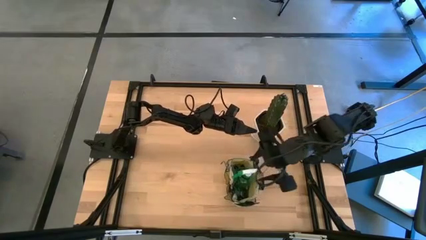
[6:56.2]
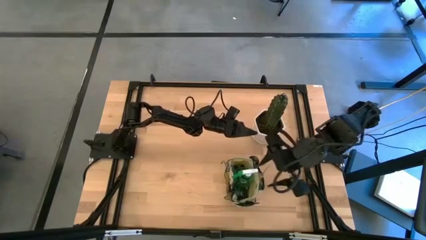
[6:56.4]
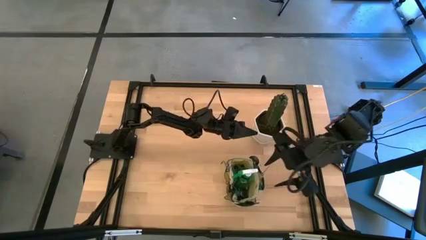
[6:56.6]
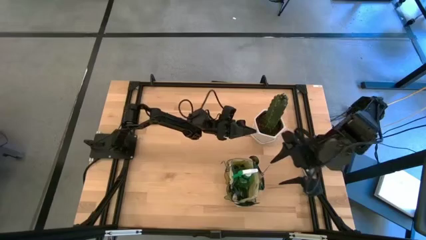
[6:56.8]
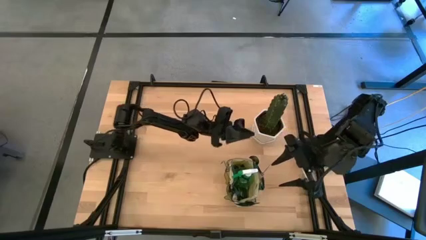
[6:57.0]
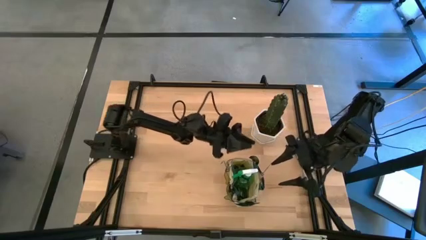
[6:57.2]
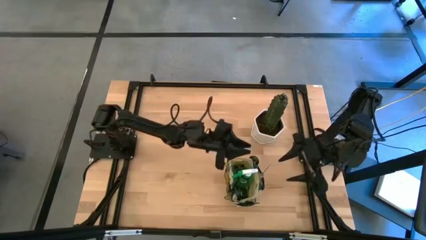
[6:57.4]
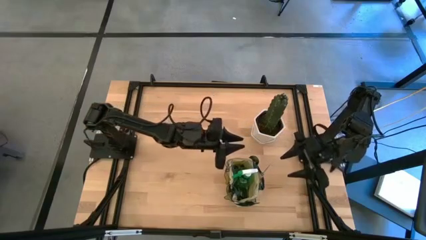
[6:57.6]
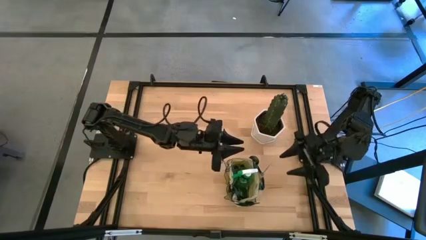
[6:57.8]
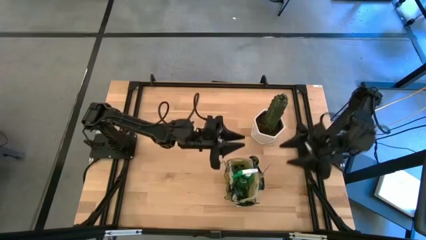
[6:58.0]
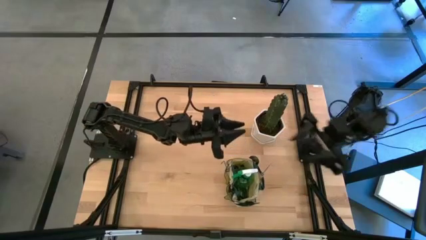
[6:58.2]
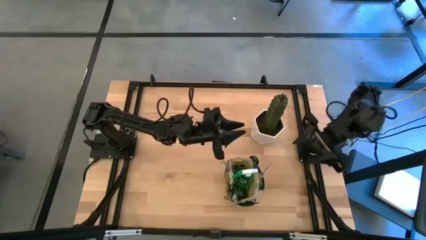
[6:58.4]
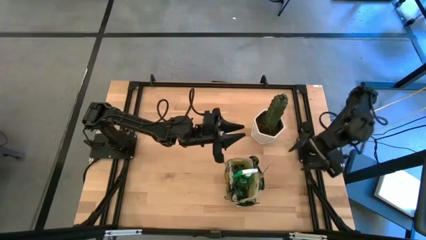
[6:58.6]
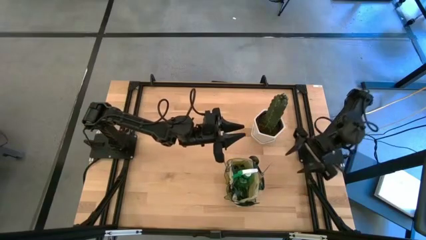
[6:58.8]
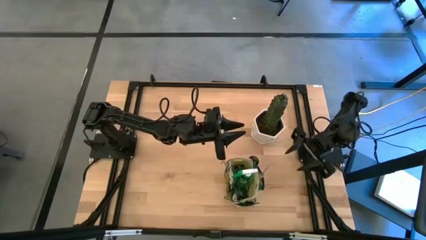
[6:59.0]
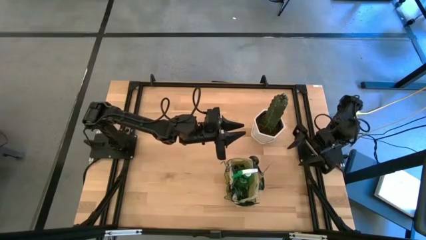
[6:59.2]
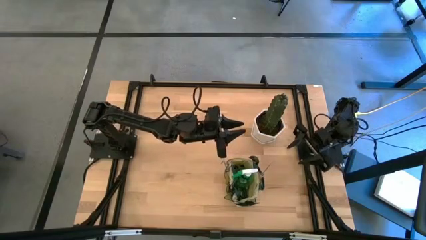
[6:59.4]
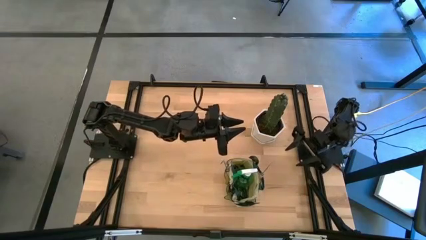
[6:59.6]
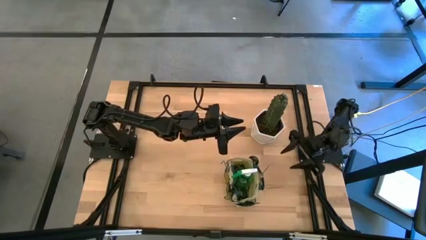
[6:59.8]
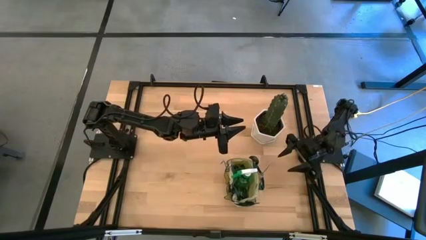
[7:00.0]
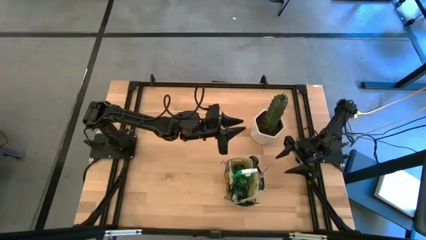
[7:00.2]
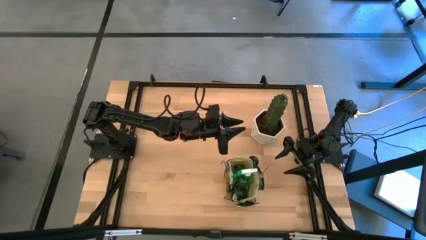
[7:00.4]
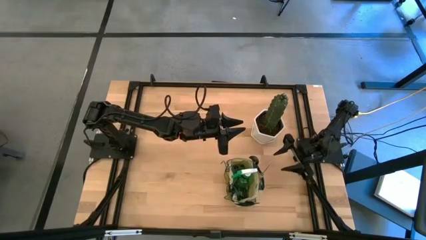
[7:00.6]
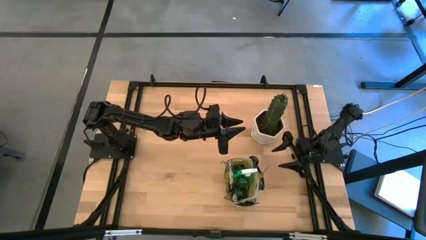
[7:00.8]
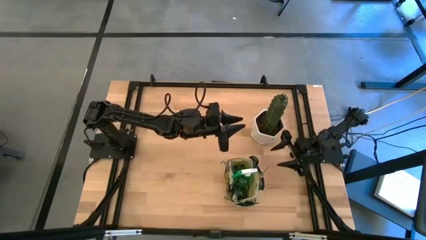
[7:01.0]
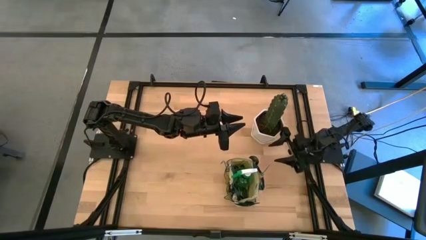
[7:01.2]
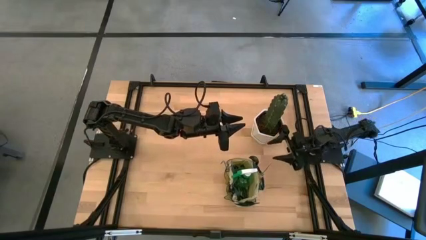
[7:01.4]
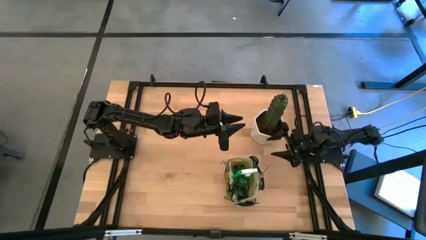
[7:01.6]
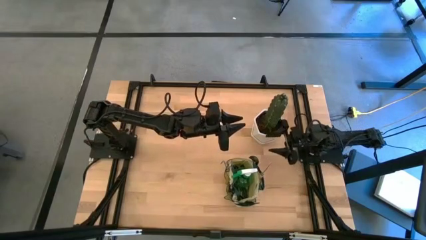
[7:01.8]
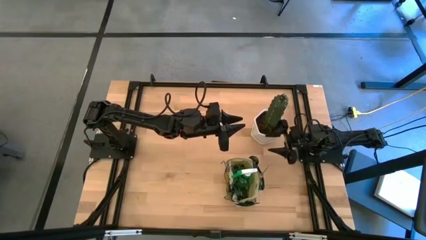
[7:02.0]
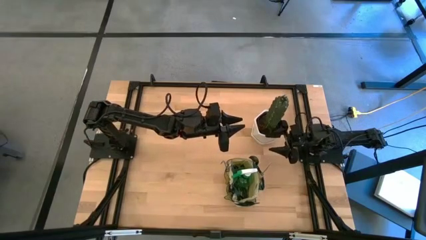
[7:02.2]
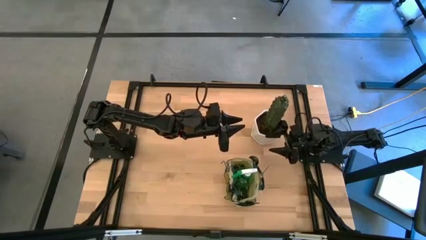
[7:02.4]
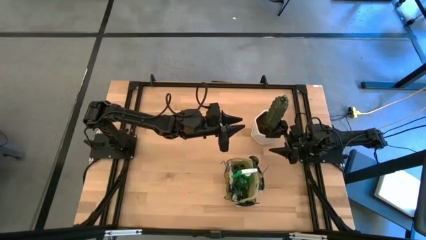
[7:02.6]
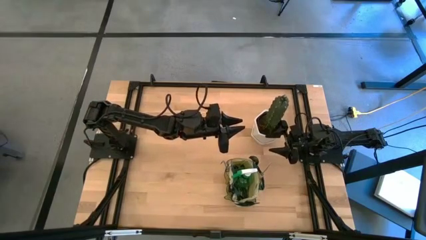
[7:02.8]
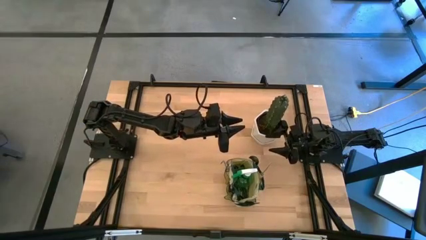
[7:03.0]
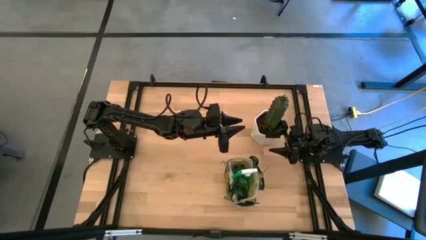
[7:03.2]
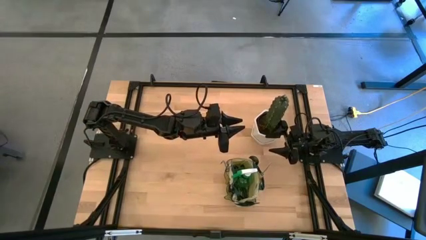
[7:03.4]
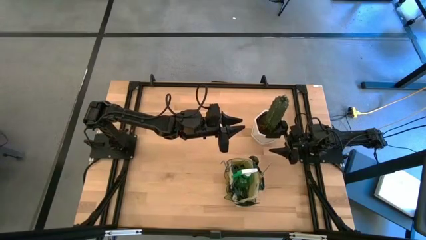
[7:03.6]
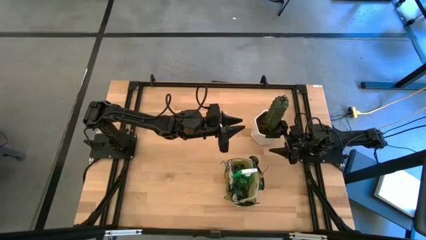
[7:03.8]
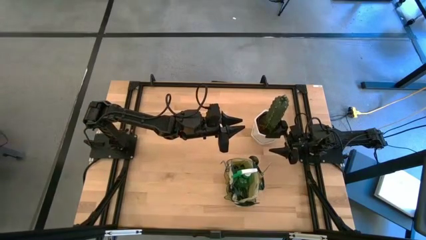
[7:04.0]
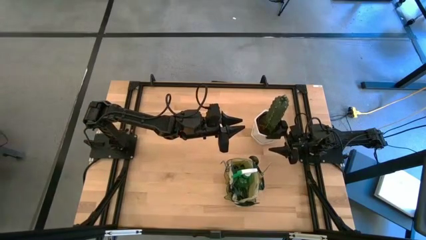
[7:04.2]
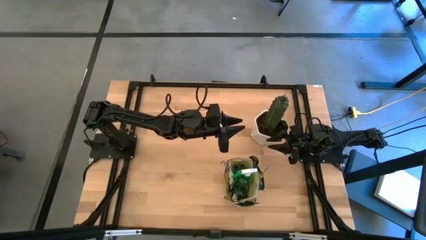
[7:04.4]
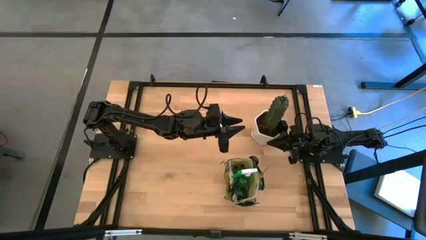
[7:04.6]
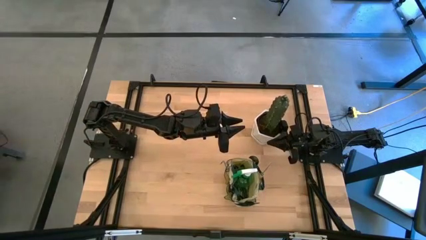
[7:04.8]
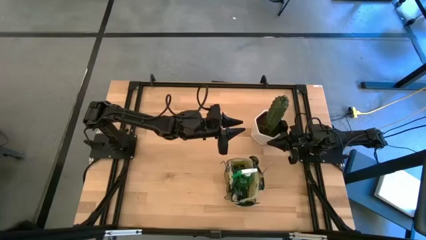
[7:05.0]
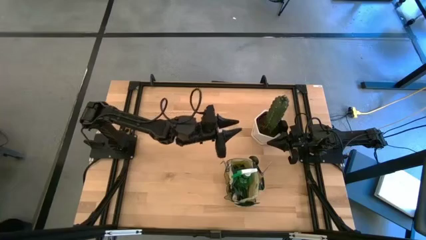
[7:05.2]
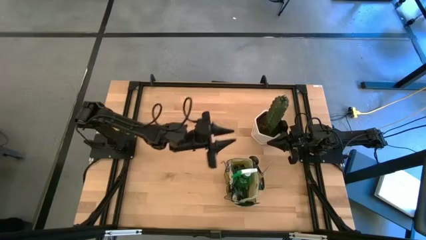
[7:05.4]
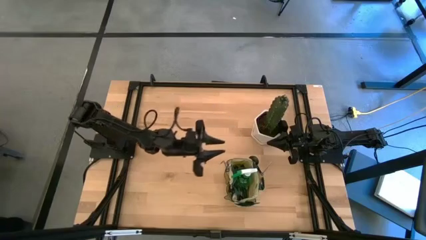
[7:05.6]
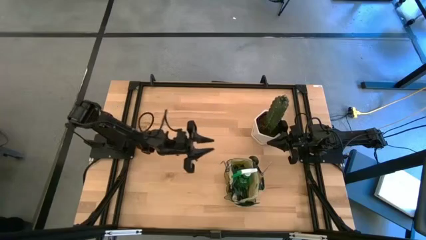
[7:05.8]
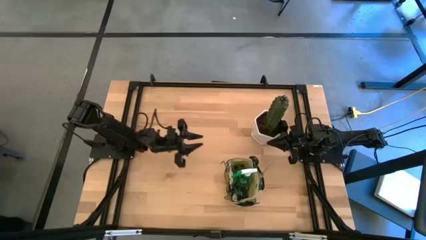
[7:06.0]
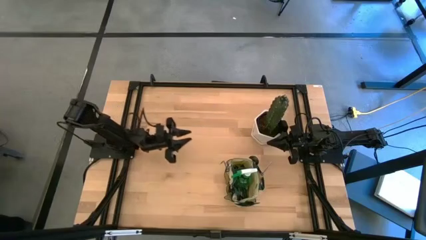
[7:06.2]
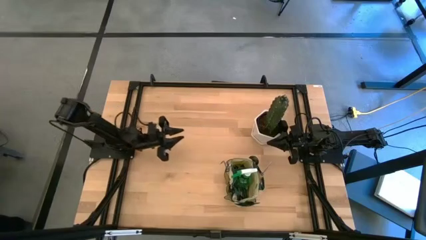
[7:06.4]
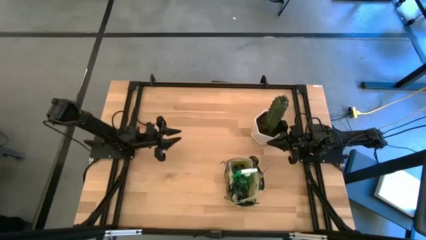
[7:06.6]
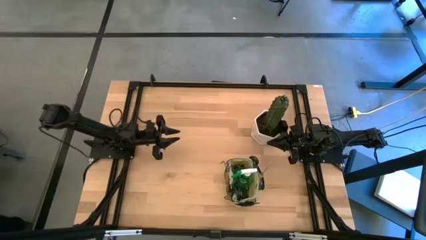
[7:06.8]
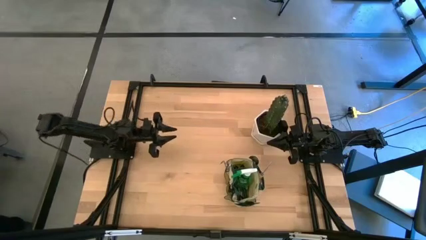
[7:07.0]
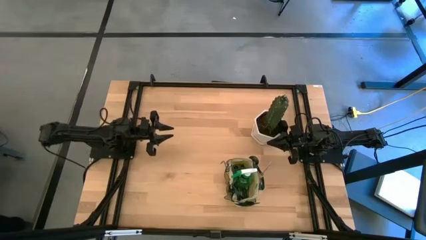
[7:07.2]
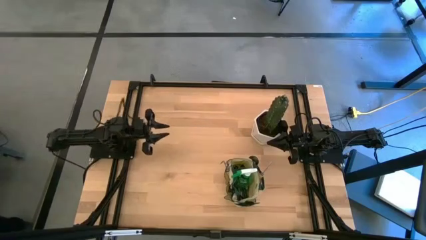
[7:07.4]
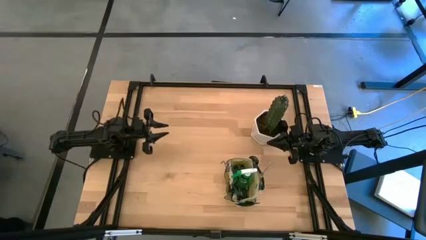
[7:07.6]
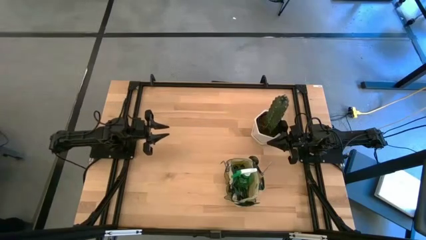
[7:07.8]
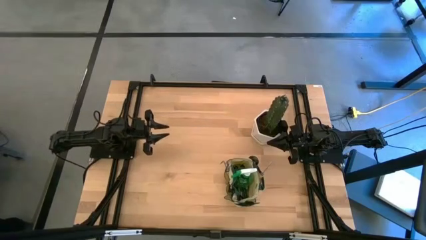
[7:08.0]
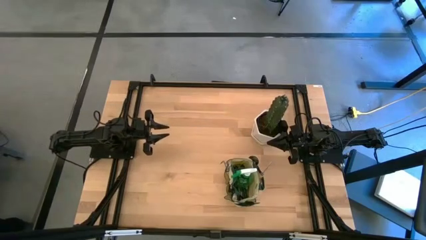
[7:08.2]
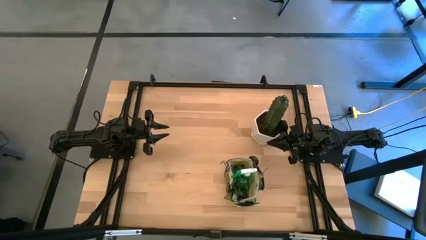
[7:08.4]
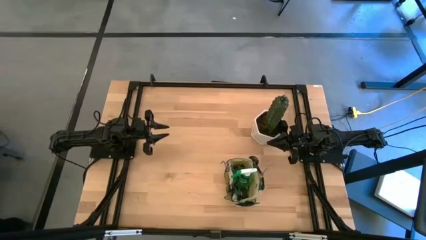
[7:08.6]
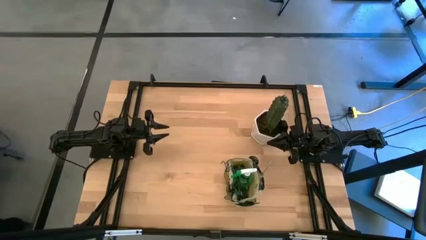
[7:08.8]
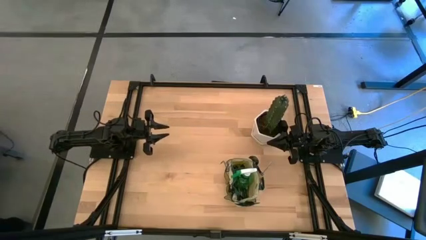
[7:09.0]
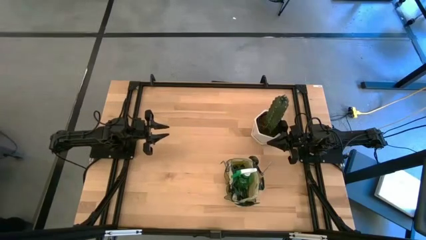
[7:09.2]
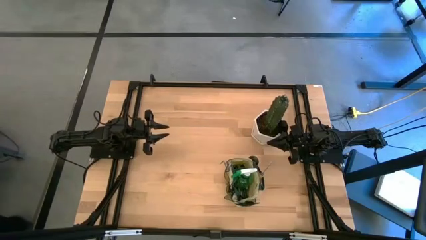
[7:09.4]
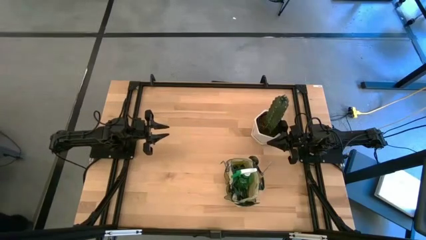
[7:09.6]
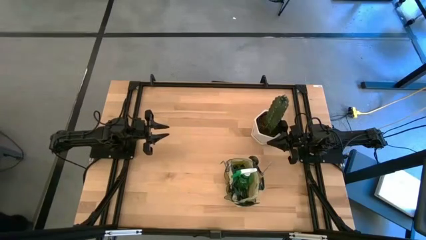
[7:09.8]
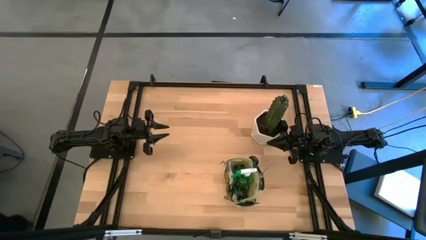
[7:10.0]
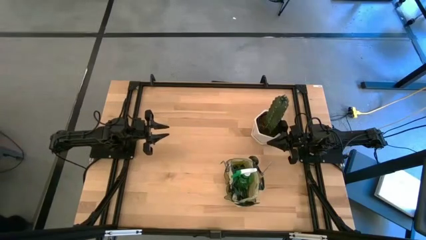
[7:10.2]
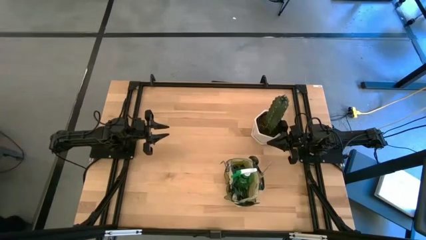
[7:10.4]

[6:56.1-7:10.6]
Task: Pick & Place Garden tools in Gardening bag
Return to Home Position

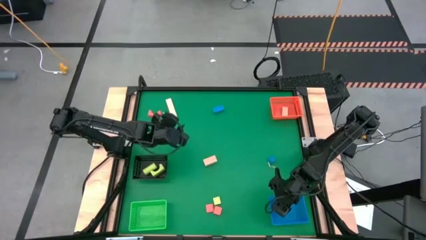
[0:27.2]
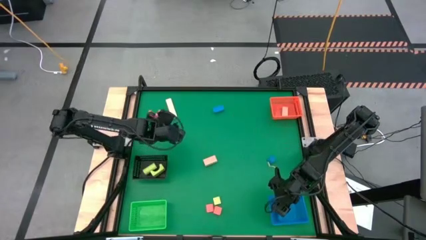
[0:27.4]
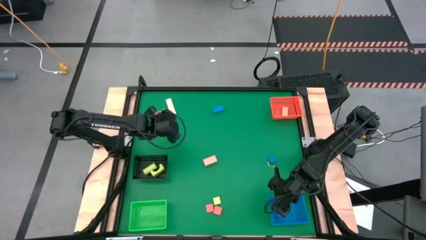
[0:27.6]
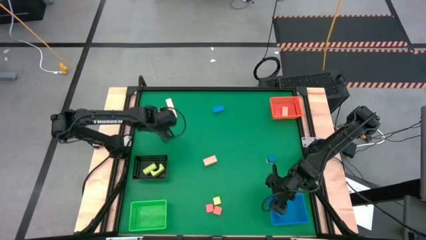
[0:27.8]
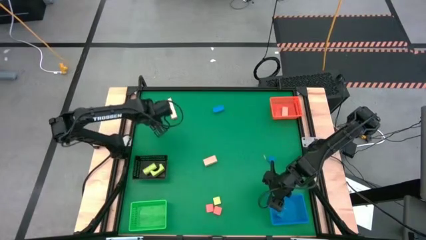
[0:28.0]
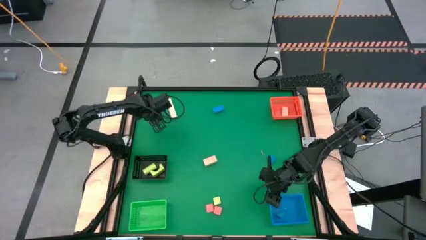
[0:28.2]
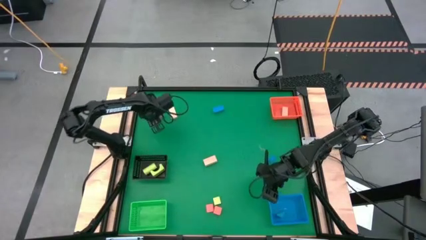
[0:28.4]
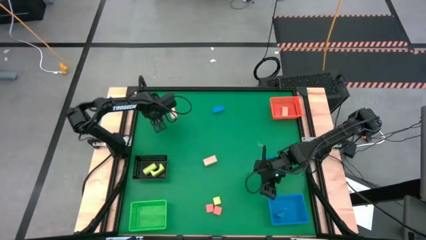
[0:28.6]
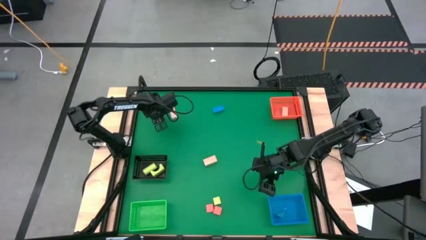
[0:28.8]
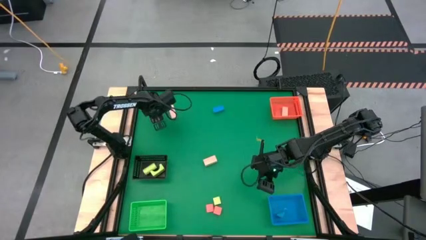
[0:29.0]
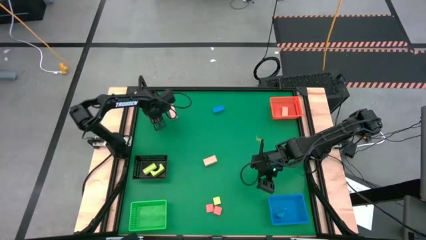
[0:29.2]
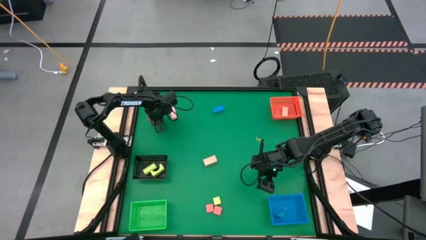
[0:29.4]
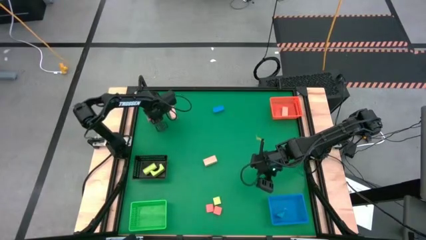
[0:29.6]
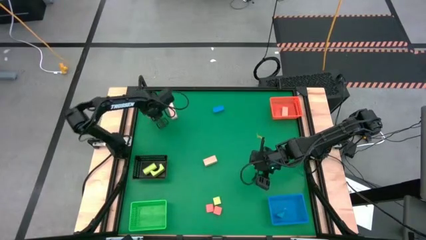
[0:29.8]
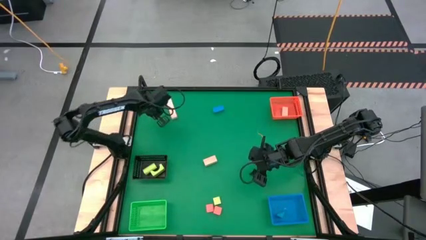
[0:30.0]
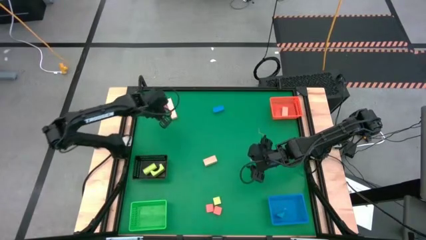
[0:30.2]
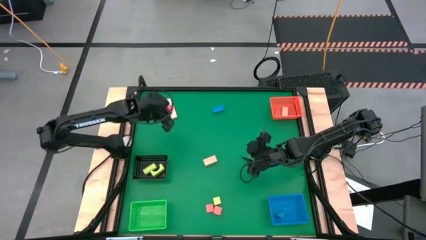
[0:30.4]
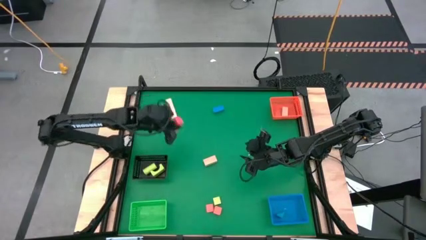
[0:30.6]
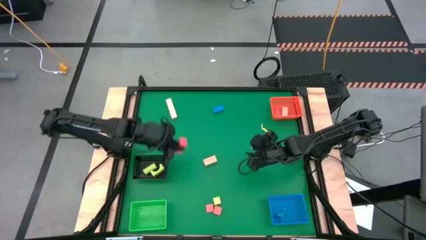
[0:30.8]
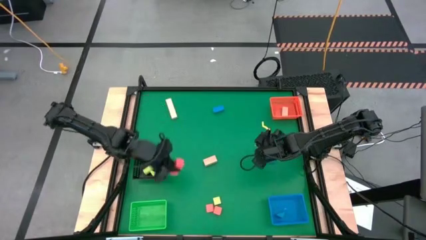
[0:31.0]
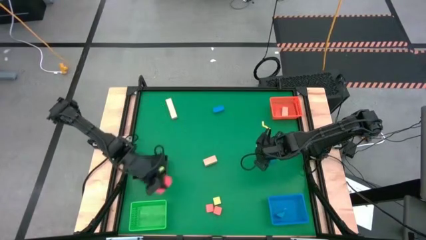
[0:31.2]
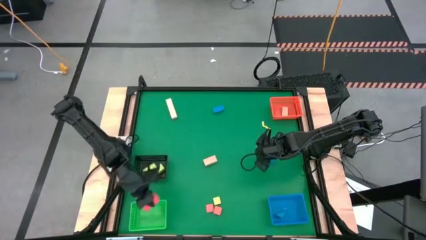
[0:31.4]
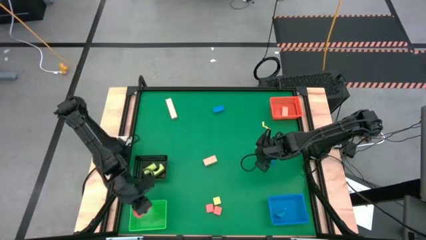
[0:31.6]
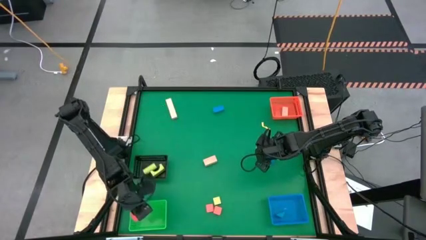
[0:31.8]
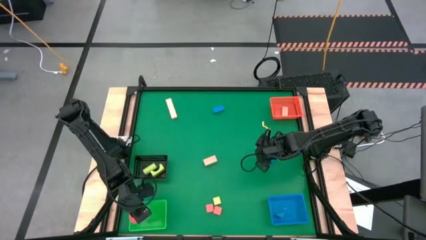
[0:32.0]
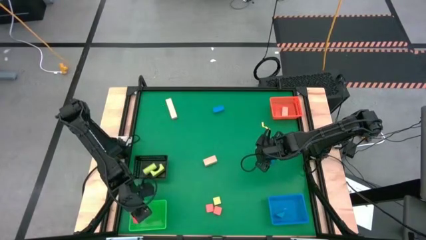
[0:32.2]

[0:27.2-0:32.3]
Task: Sort & place blocks by color
Put the top orange wooden block into the green basket
